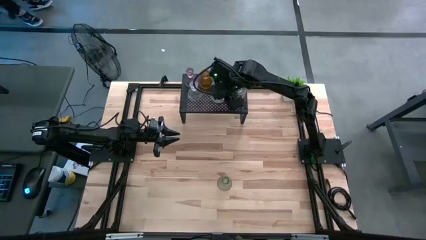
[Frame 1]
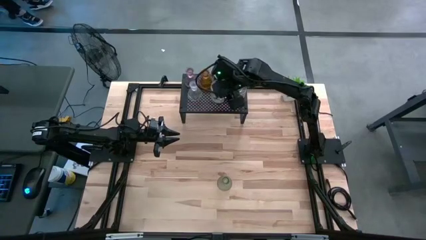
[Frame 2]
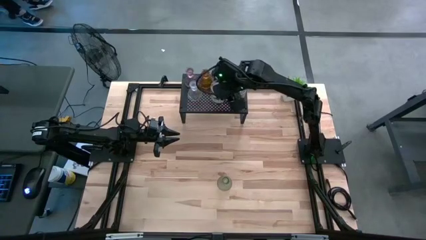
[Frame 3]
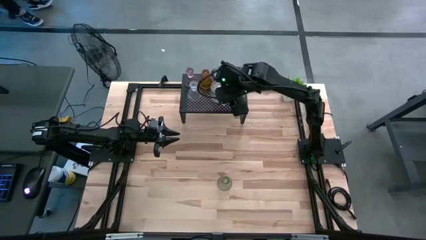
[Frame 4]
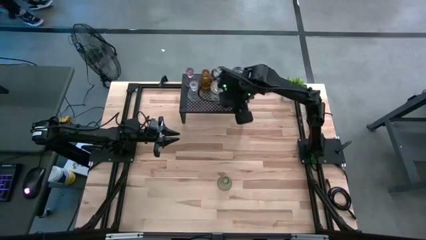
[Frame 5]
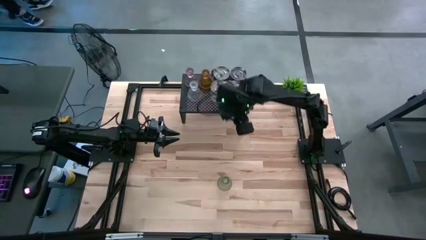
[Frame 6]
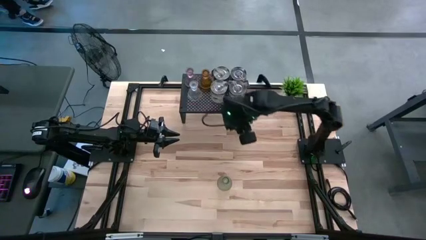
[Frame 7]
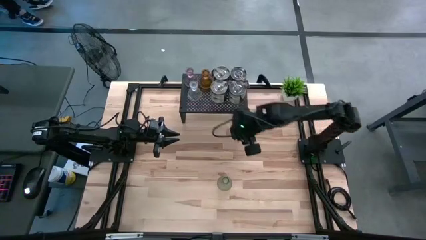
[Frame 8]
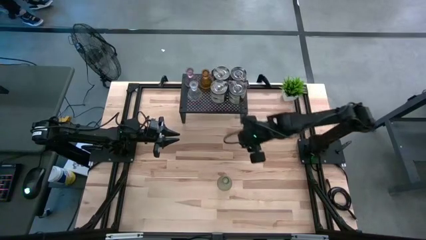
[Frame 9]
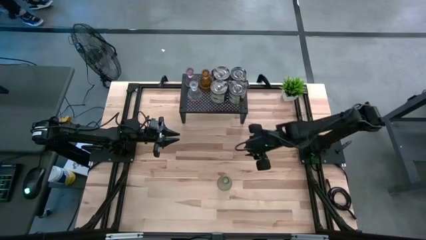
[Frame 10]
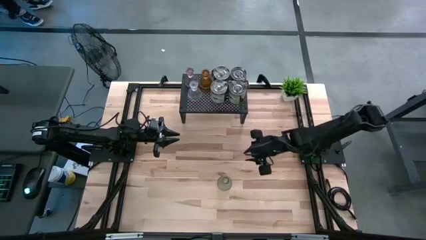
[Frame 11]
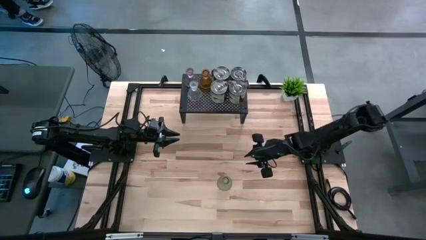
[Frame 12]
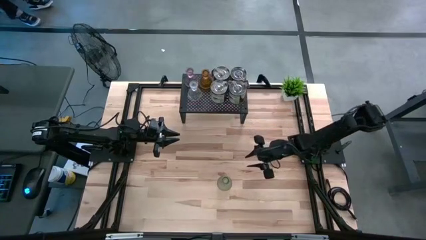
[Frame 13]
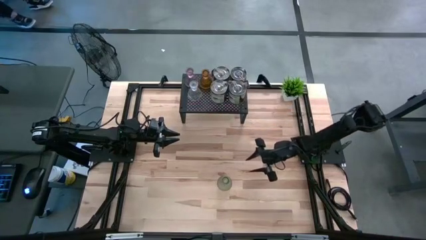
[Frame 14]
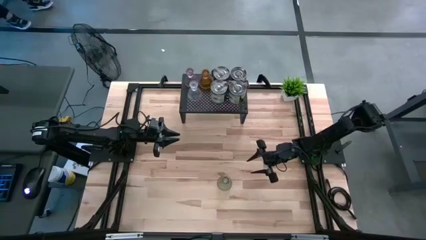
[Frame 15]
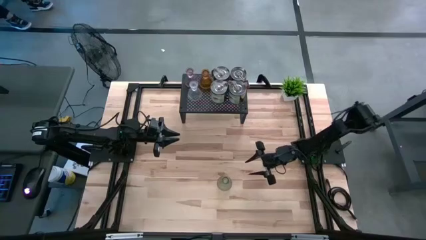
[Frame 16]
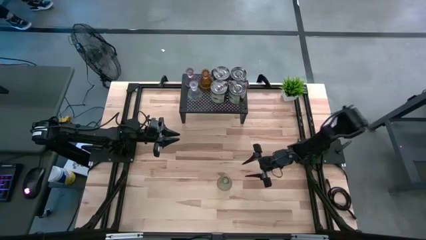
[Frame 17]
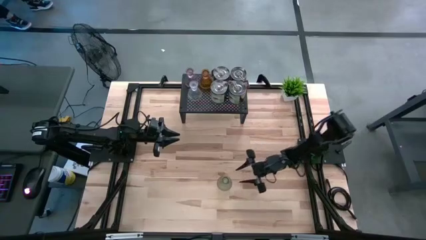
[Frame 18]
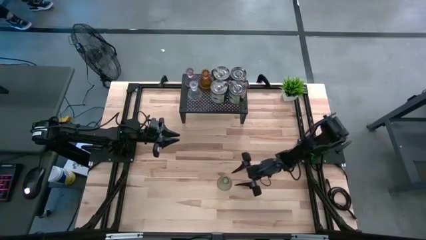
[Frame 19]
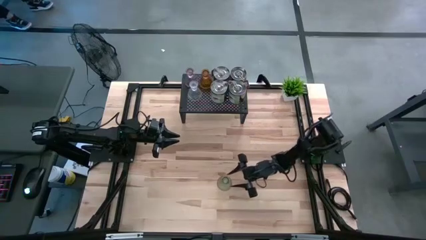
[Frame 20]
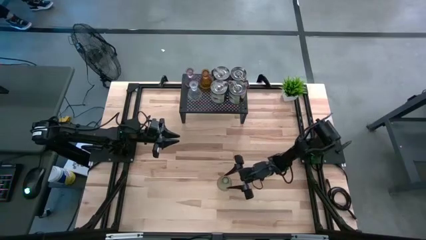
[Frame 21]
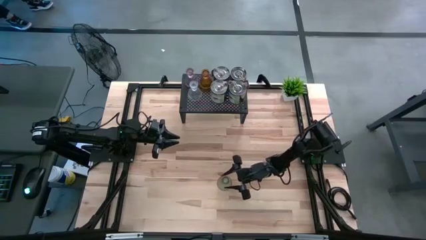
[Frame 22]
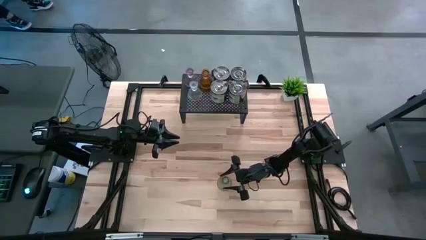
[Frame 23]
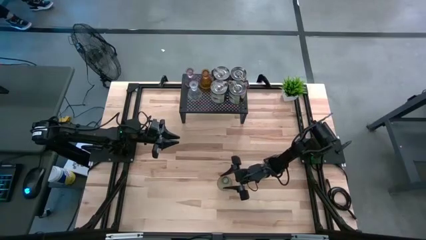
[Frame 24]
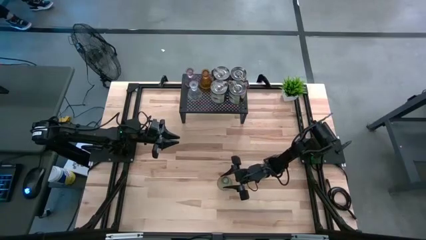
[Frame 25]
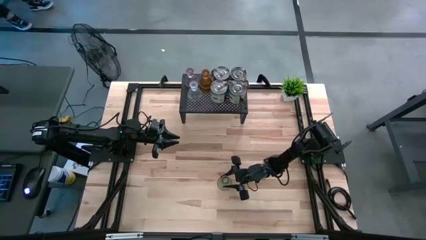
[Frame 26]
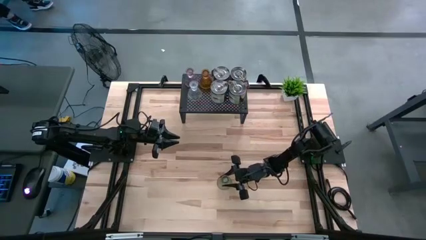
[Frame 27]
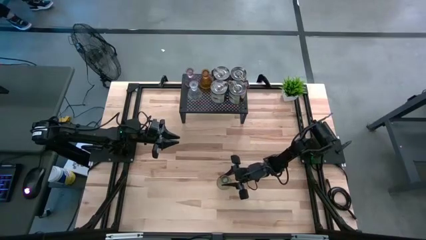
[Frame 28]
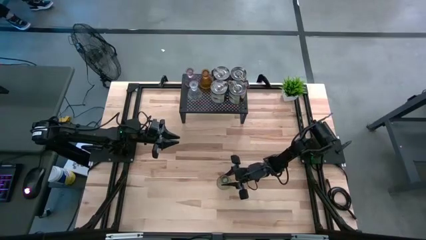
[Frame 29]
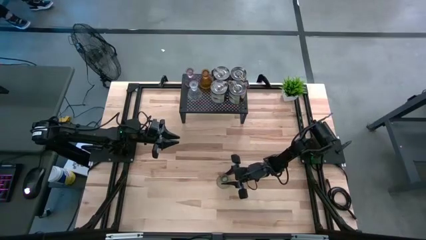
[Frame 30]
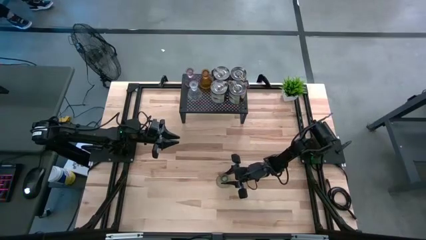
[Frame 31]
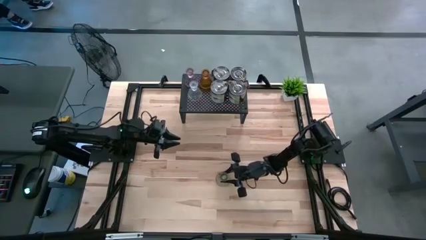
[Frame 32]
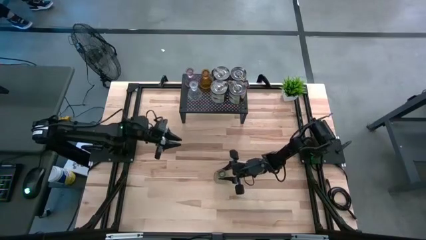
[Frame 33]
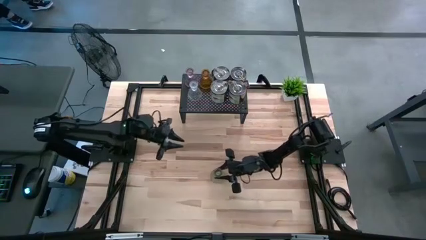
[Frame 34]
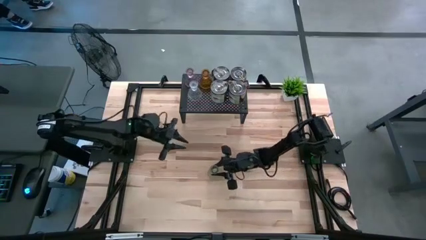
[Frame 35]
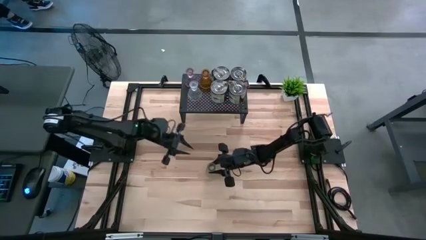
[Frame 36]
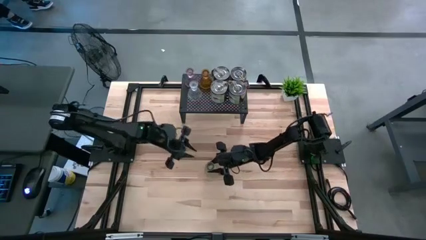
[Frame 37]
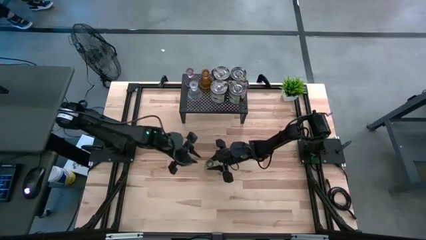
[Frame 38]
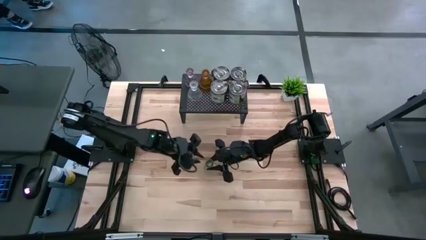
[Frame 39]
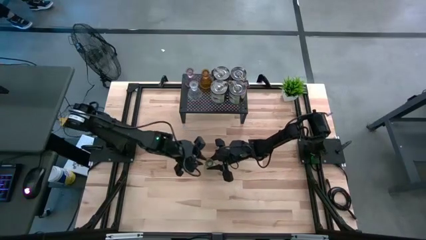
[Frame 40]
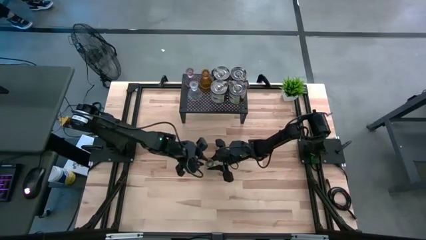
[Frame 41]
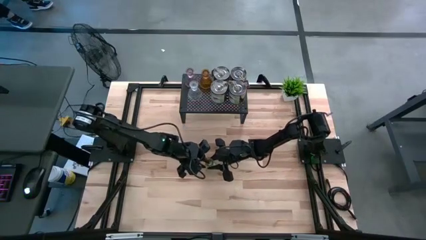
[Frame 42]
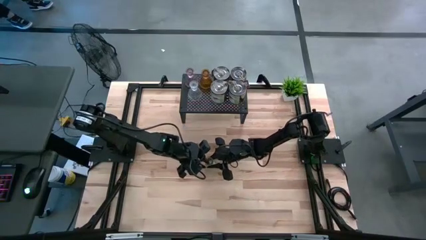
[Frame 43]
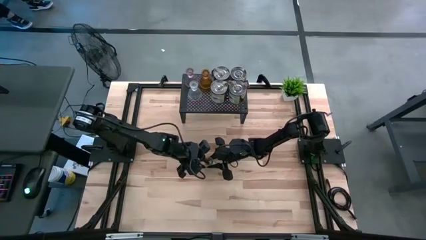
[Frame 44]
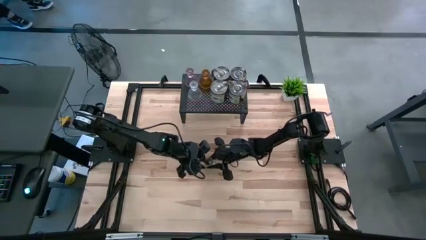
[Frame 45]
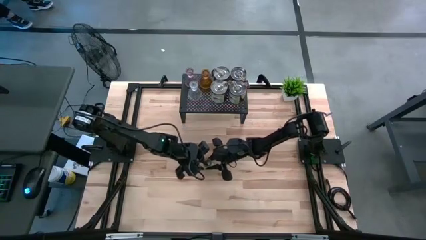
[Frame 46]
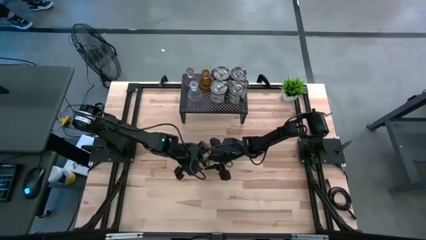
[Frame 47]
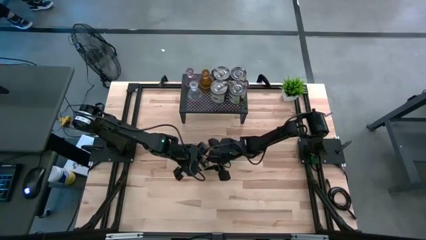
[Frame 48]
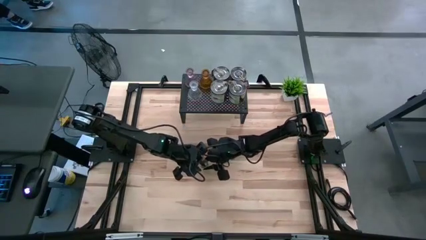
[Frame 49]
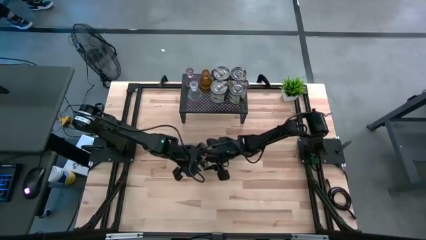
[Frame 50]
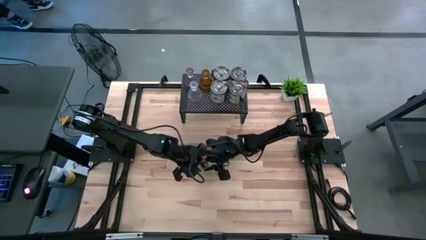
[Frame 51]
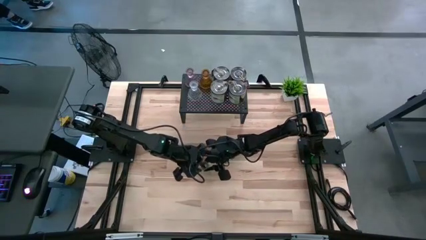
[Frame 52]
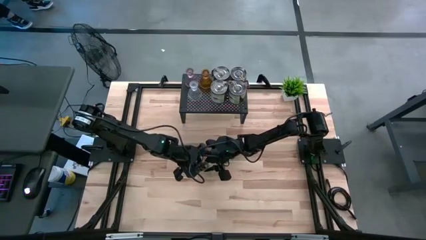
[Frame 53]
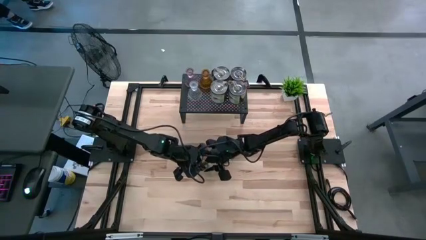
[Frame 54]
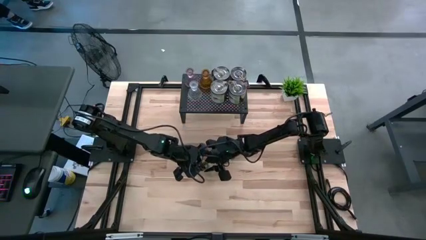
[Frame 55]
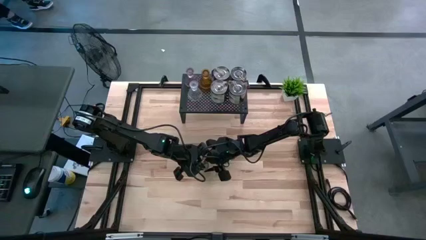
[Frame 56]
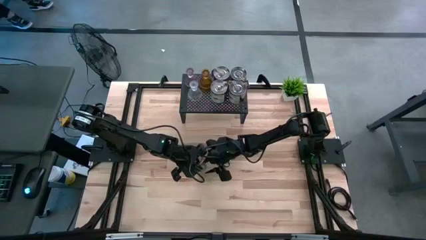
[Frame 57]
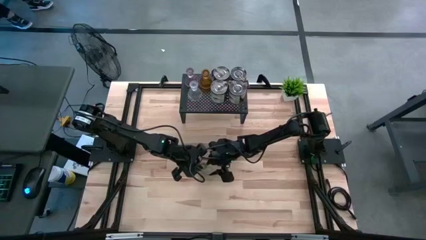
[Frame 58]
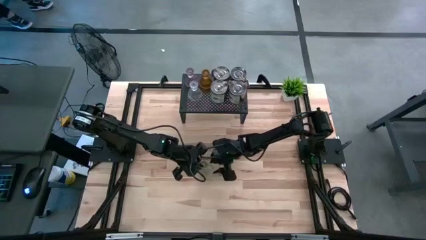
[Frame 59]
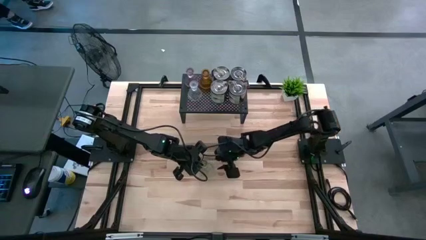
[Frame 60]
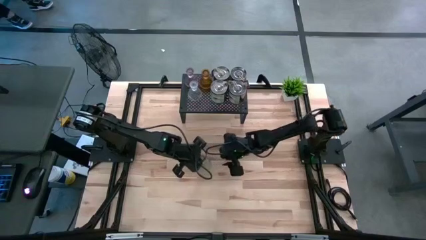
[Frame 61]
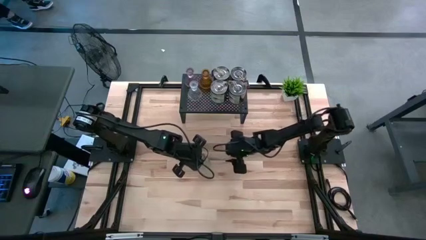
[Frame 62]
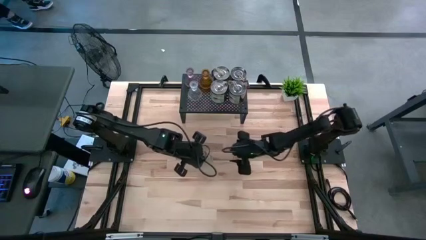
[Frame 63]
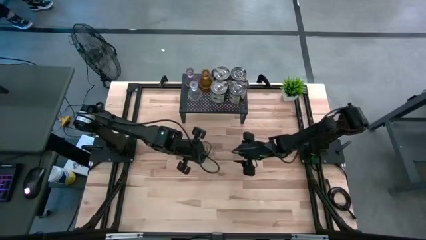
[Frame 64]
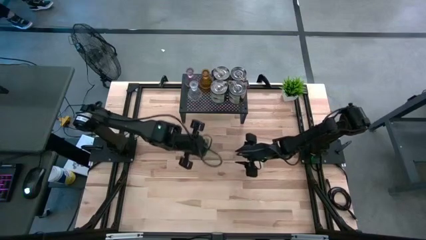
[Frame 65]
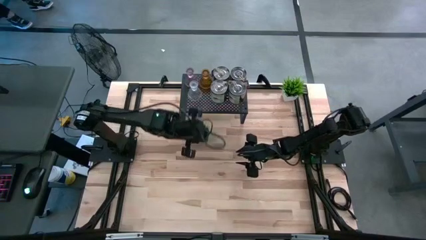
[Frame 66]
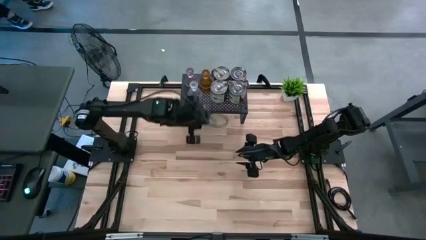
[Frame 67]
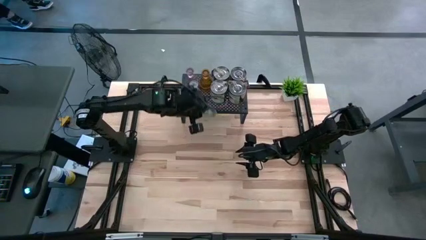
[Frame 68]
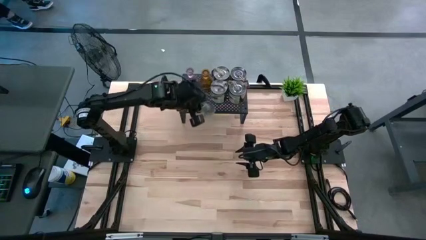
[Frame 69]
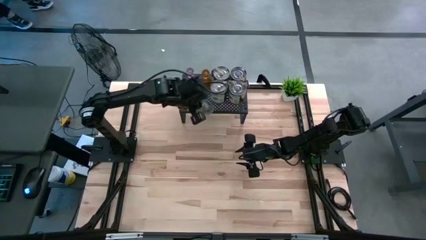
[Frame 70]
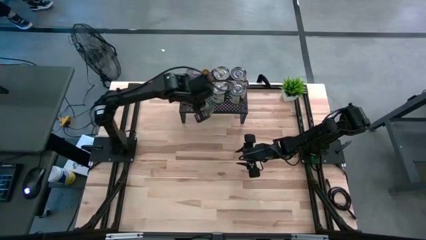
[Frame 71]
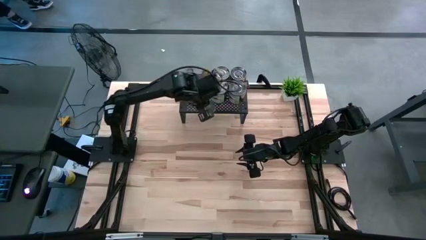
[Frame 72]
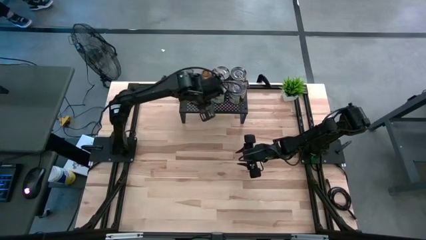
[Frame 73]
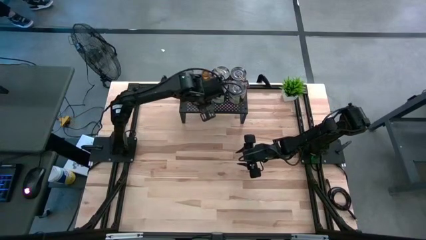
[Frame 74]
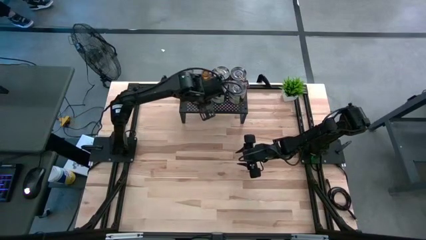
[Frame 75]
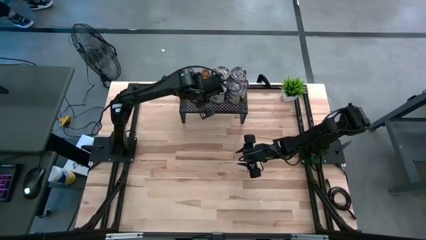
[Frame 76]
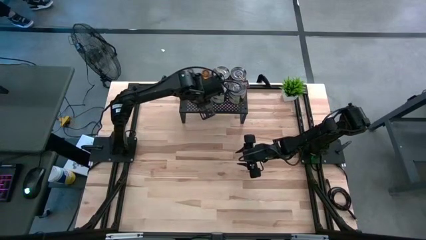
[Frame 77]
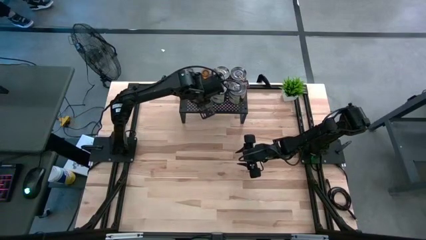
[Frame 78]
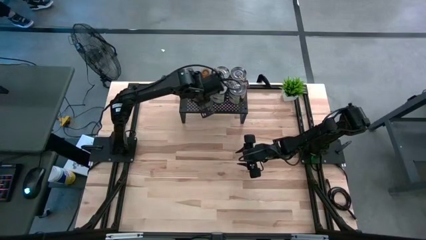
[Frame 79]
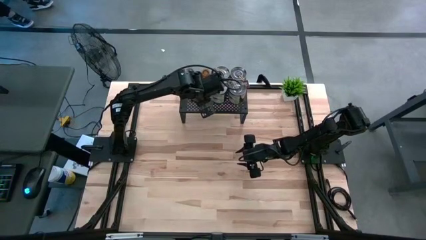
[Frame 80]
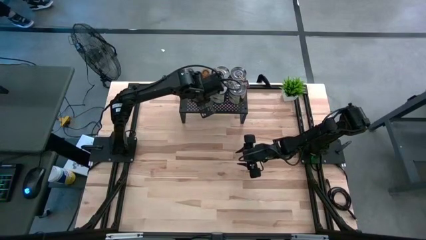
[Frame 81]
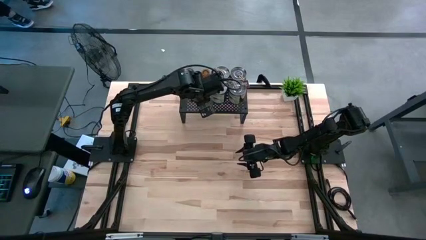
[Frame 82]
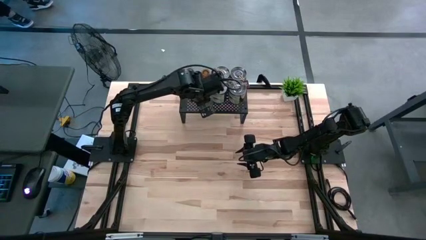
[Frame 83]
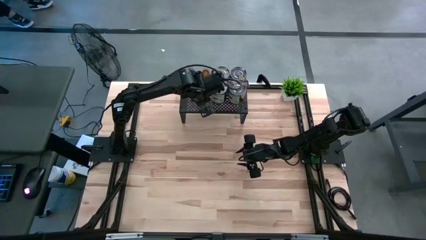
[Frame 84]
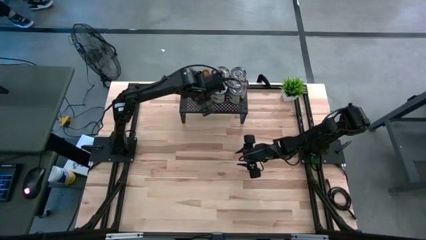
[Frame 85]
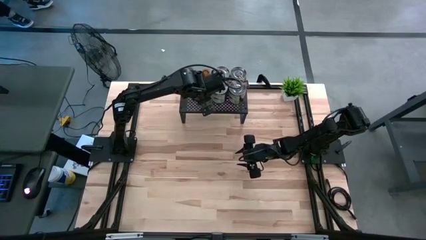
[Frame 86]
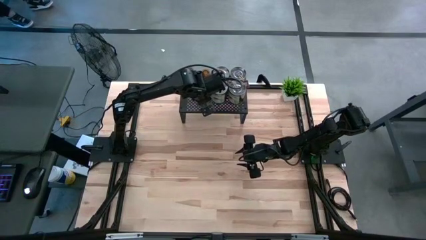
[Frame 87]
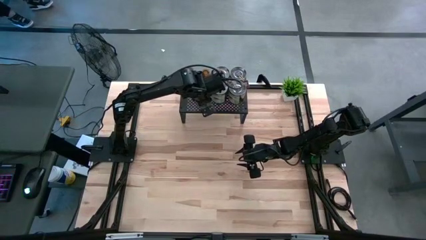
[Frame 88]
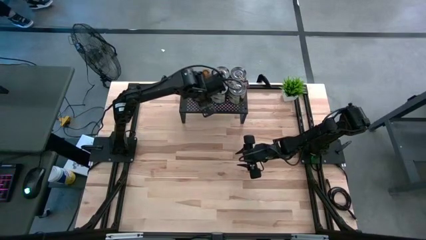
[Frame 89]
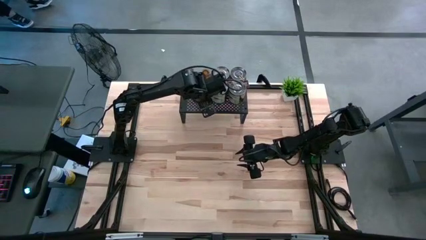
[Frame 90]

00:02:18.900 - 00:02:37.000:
Task: Pick & Place candle stick holders
Put the green glass candlestick on the shelf aligned with the other candlesticks
